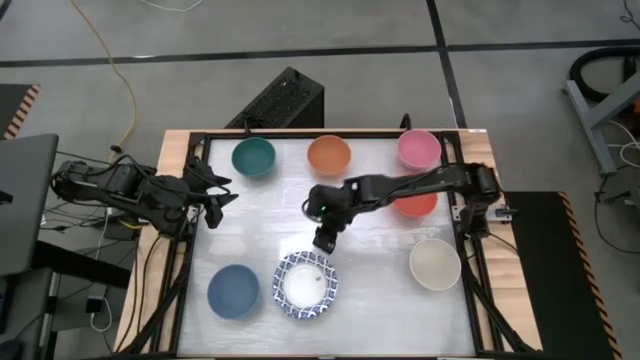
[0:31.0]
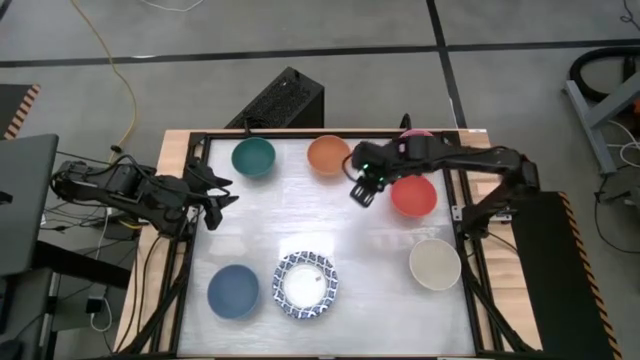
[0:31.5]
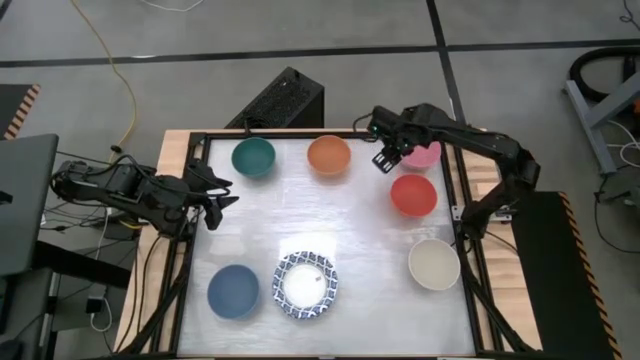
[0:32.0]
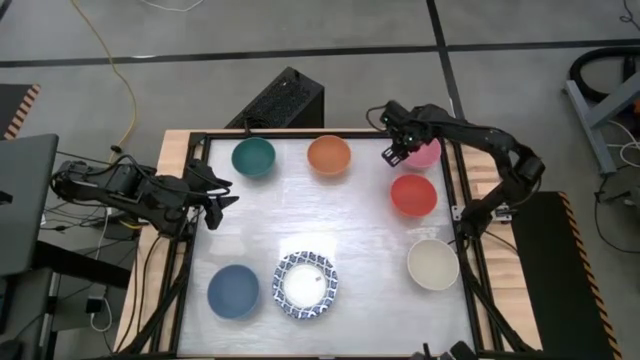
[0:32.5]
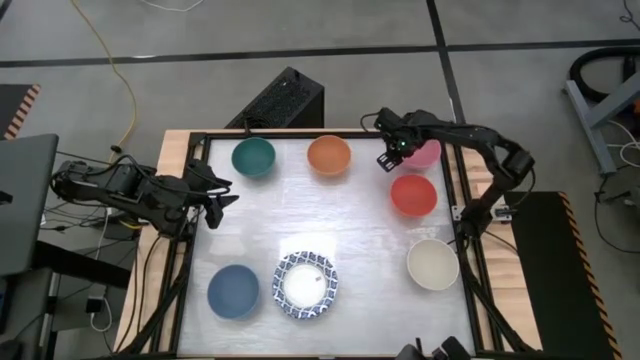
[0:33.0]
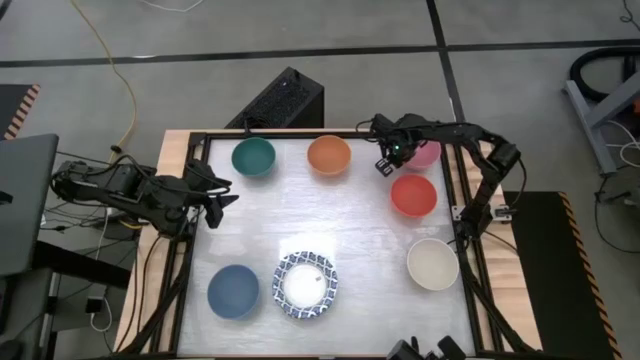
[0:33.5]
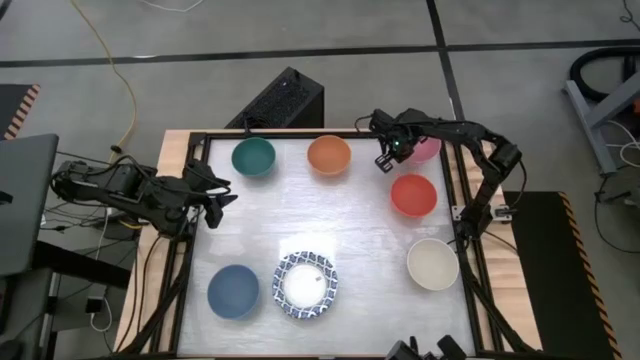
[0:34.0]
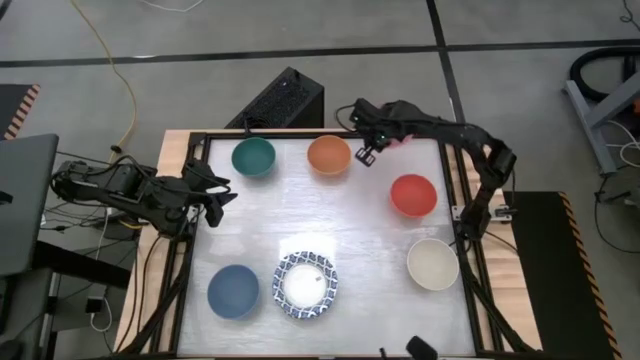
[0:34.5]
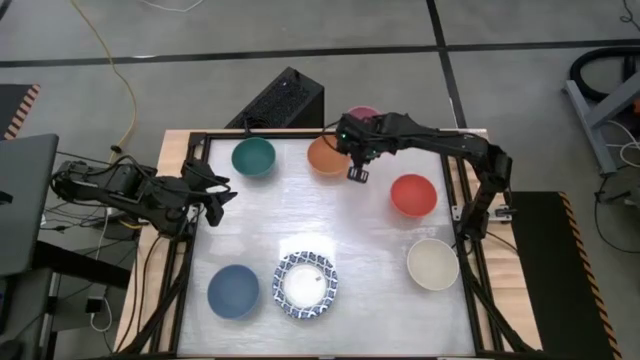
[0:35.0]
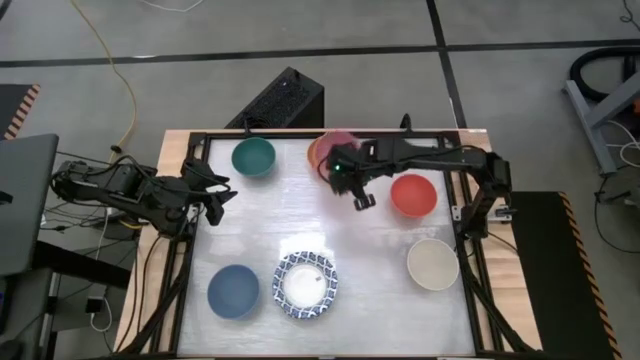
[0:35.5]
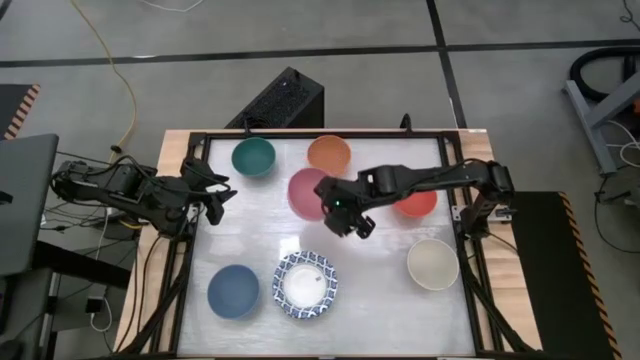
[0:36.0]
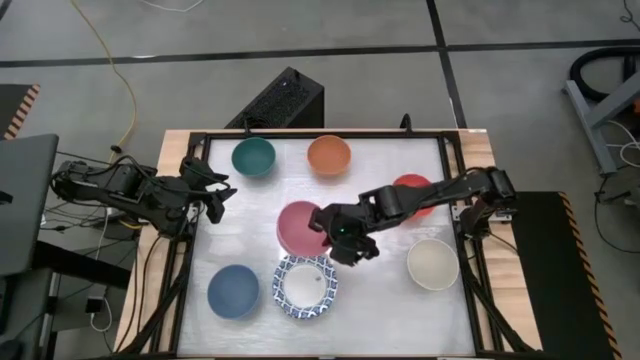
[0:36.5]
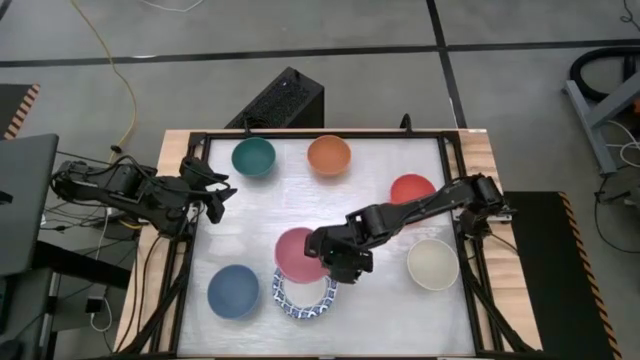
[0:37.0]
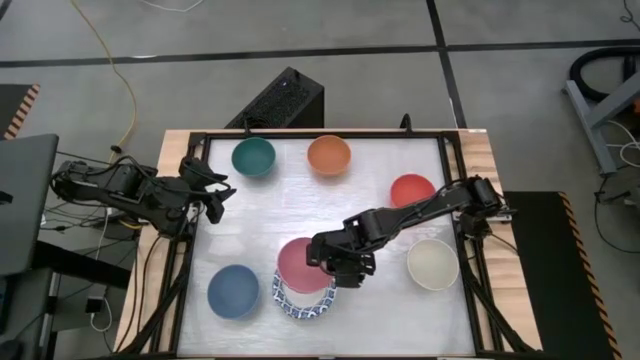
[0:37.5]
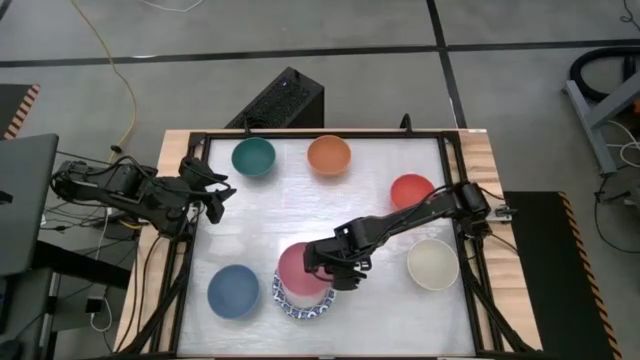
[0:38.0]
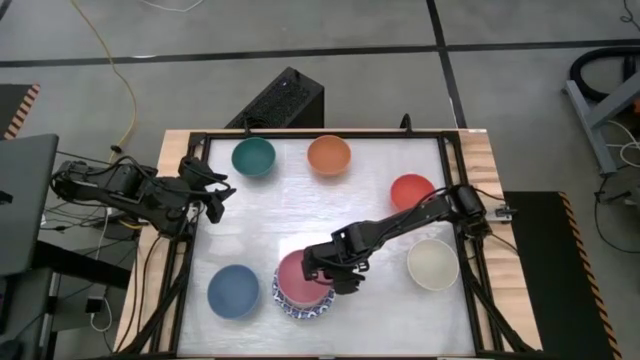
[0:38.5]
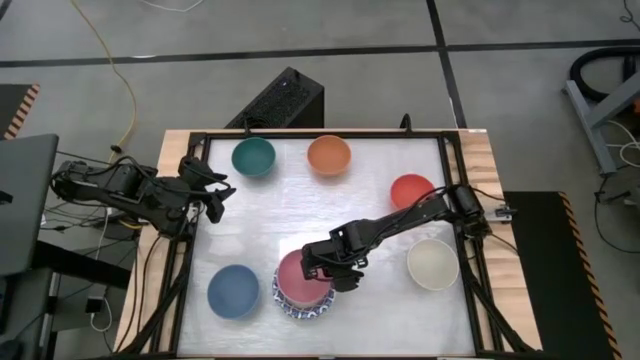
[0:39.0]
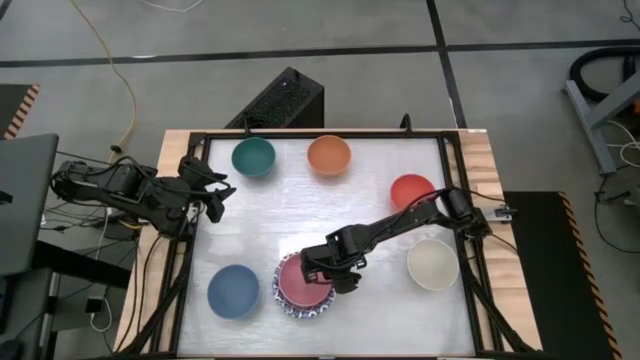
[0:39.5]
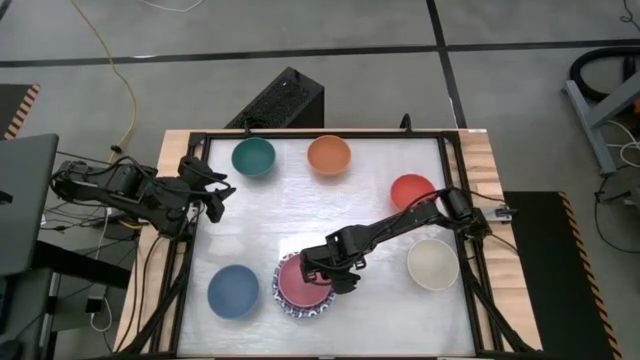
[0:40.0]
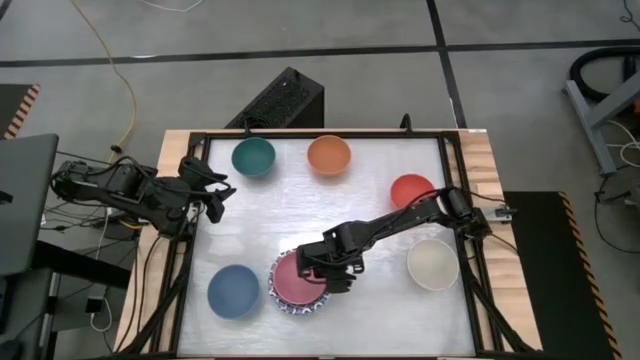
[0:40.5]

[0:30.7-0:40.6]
Stack the pink bowl on the blue patterned bowls

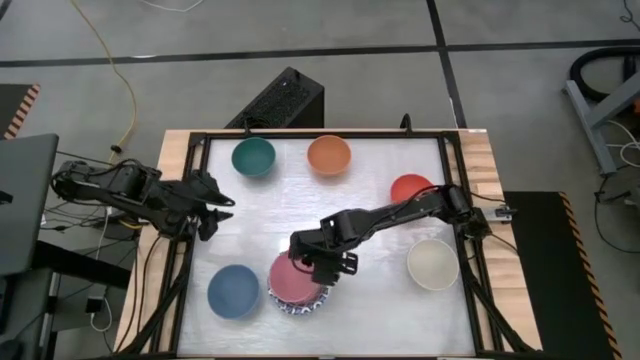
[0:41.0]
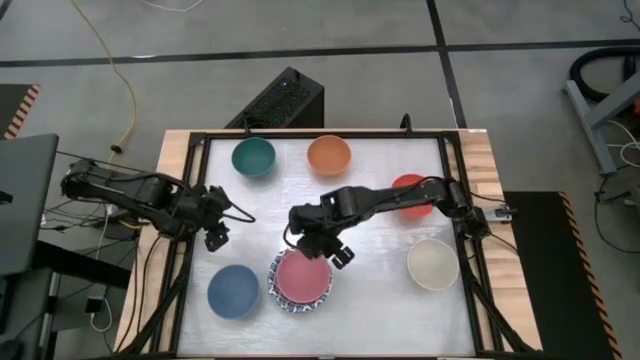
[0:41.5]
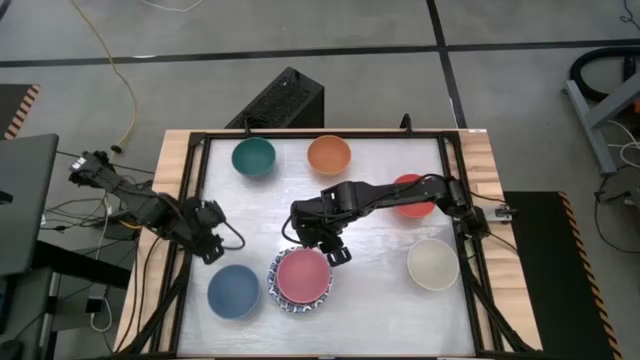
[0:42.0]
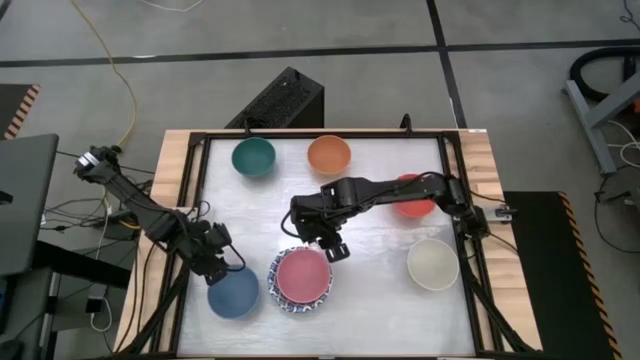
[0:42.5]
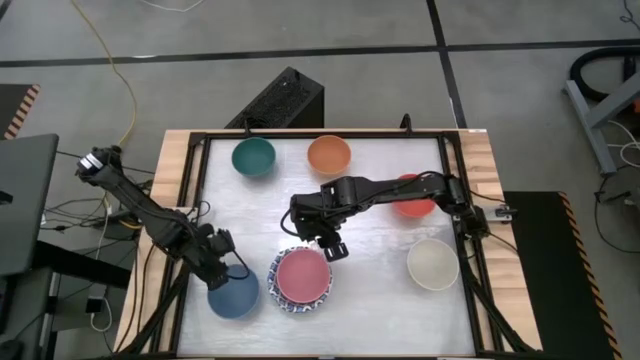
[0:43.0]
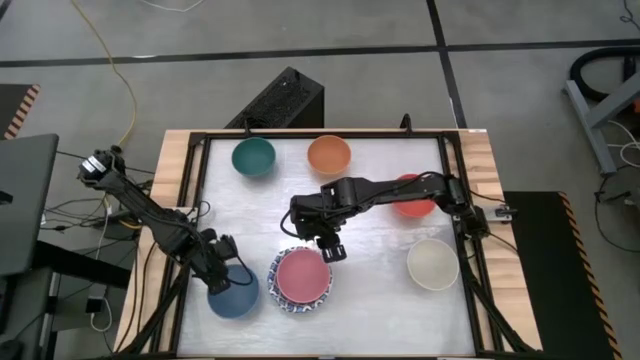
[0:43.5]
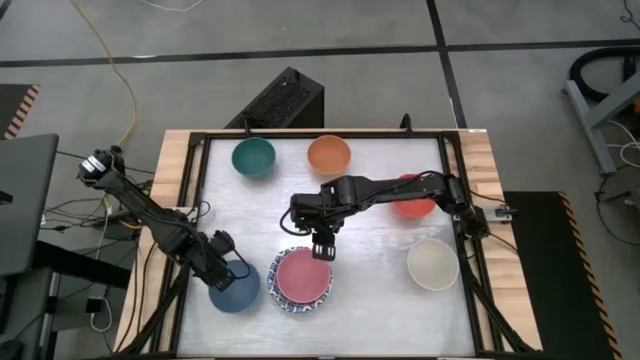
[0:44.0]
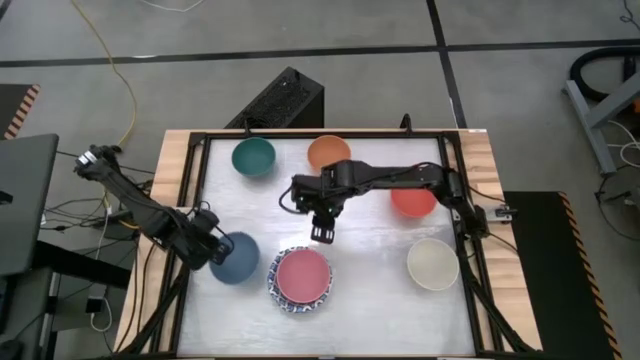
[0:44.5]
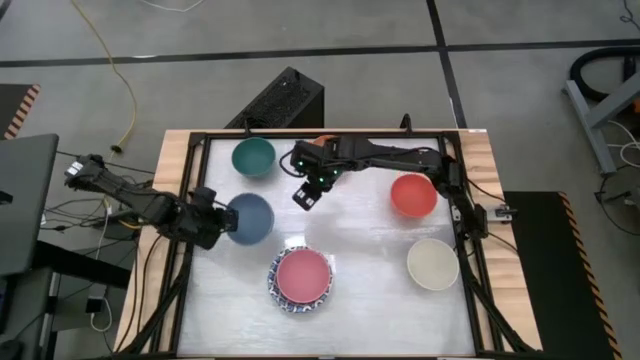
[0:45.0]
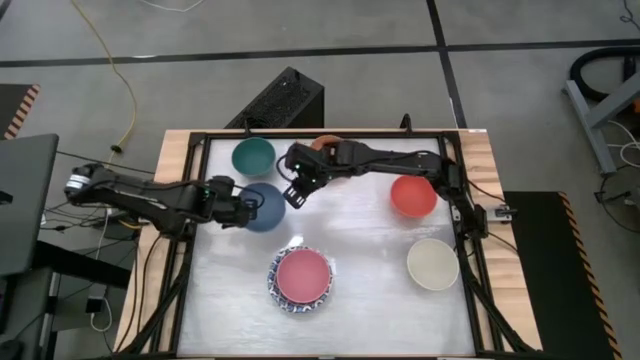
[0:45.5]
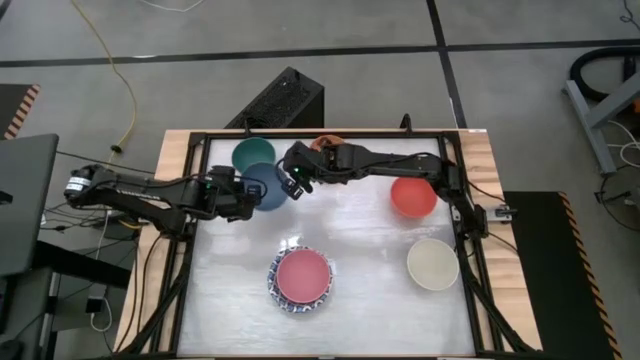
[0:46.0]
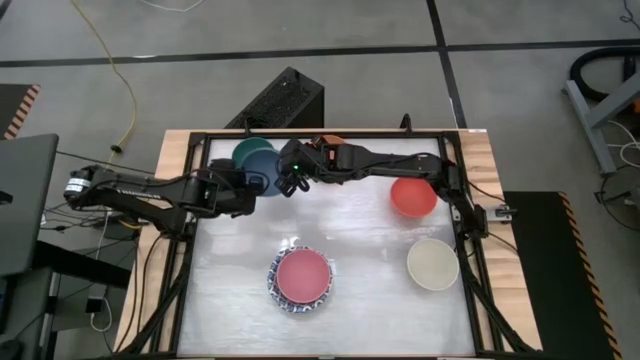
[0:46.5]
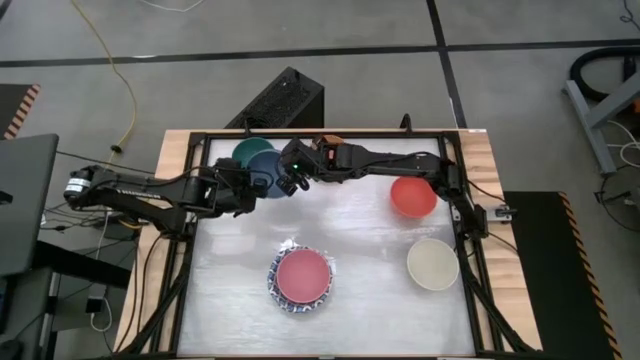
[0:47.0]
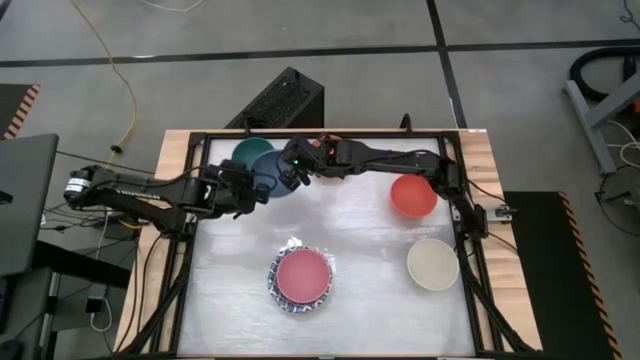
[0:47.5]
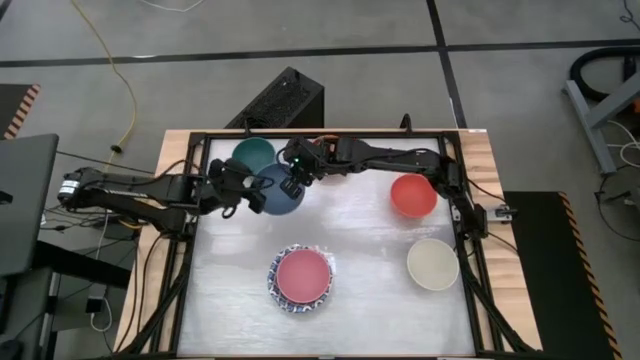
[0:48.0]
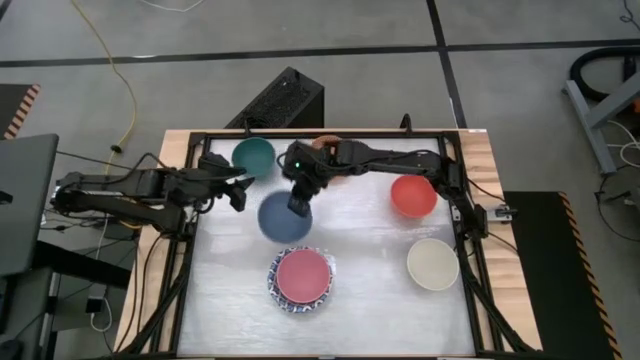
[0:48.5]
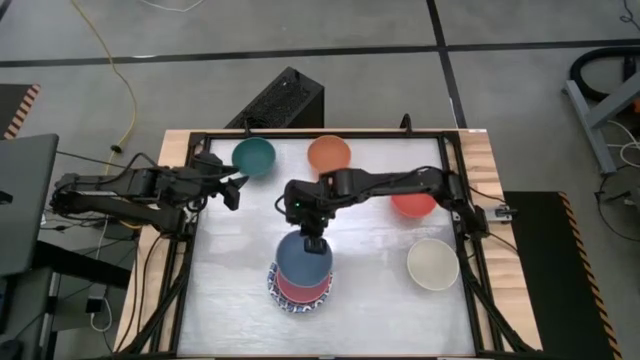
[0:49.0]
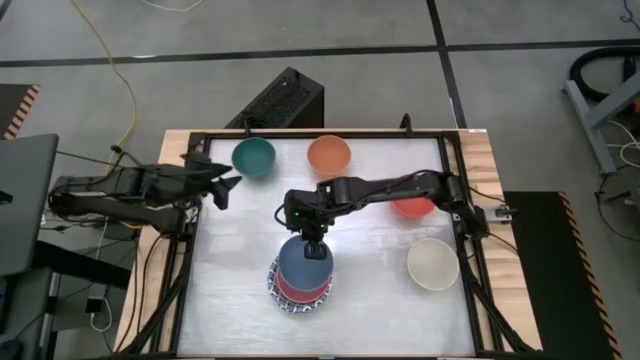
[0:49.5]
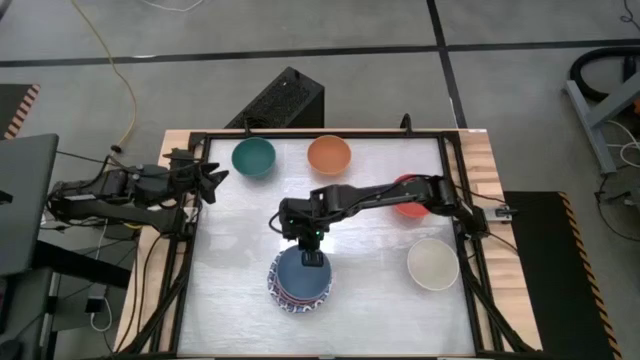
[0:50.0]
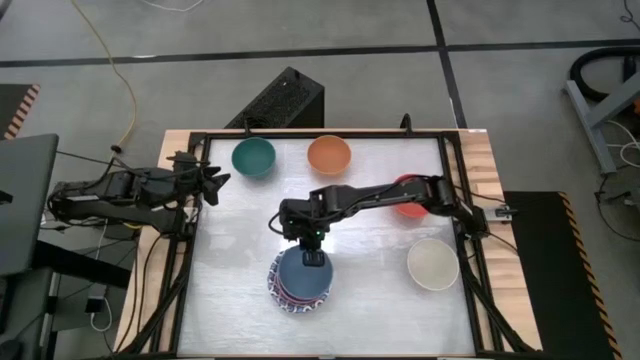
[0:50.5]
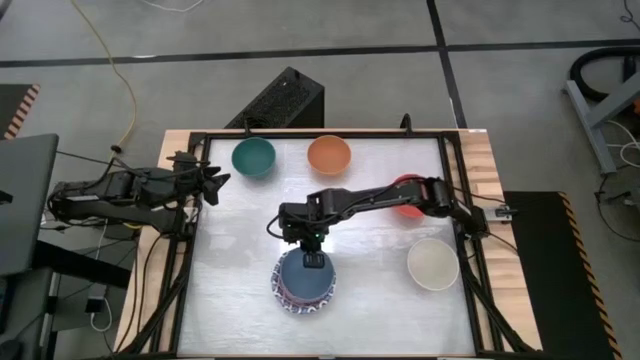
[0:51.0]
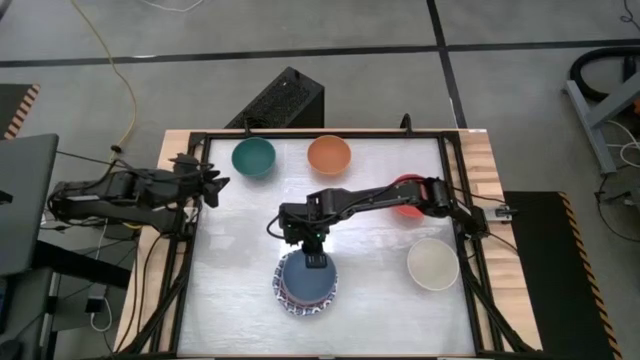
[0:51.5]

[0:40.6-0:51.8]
Stack the blue bowl into the pink bowl
